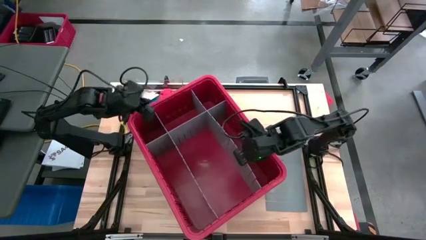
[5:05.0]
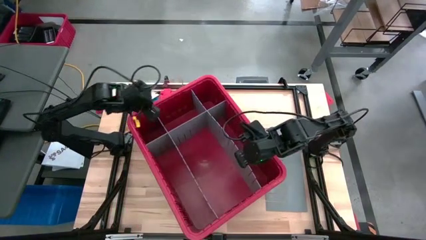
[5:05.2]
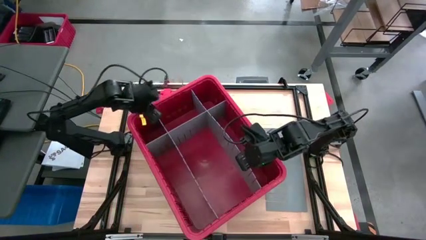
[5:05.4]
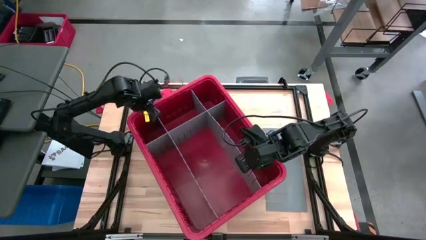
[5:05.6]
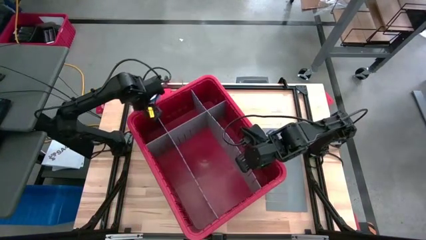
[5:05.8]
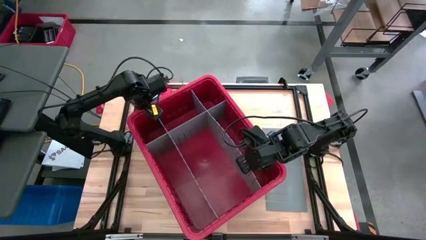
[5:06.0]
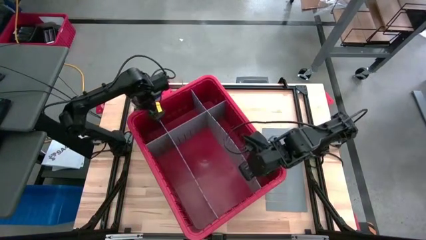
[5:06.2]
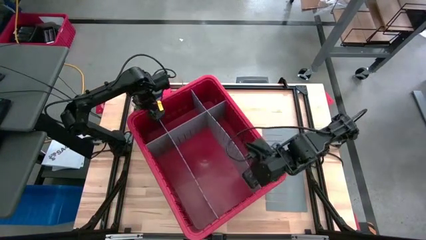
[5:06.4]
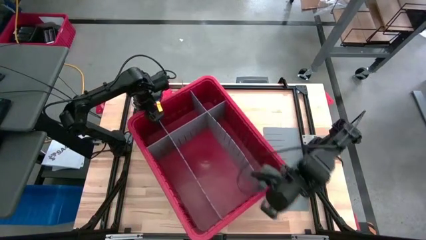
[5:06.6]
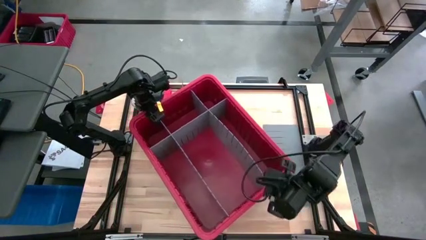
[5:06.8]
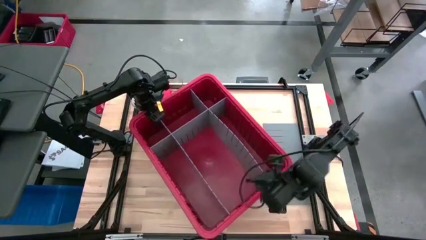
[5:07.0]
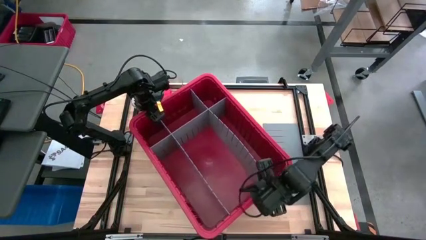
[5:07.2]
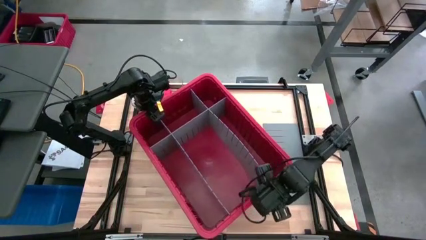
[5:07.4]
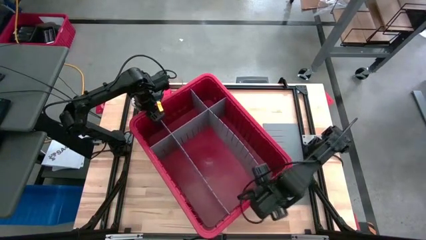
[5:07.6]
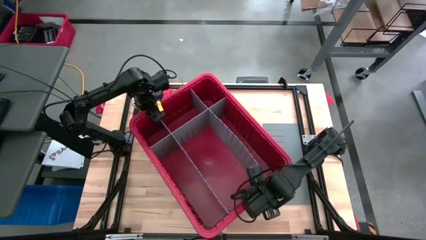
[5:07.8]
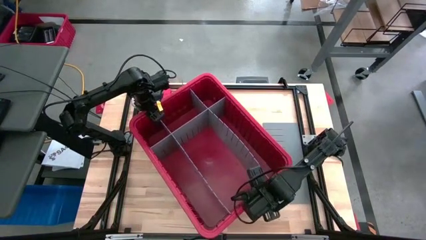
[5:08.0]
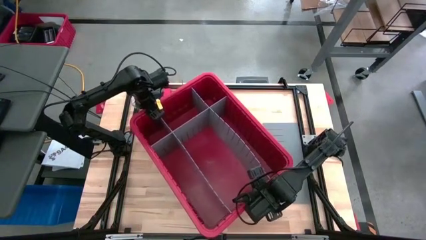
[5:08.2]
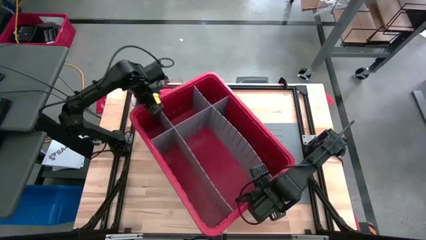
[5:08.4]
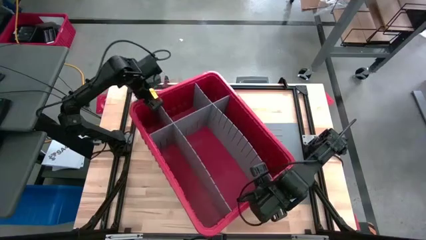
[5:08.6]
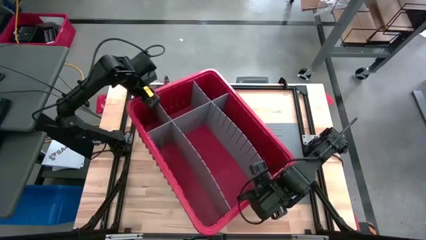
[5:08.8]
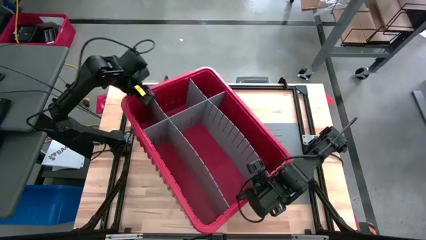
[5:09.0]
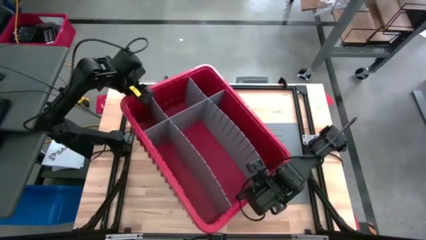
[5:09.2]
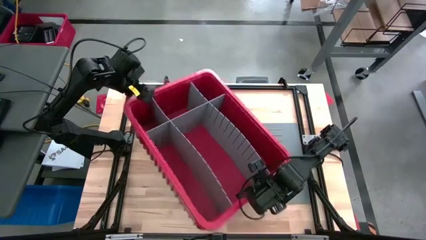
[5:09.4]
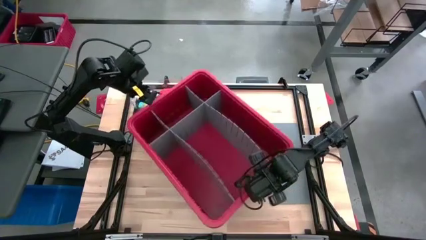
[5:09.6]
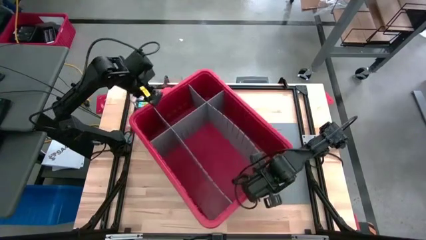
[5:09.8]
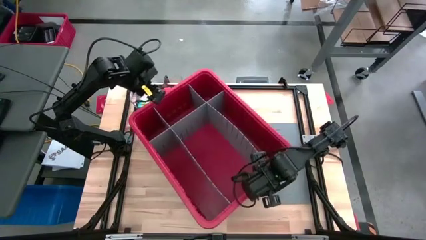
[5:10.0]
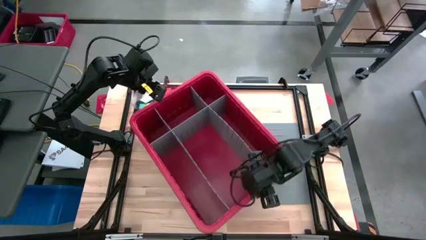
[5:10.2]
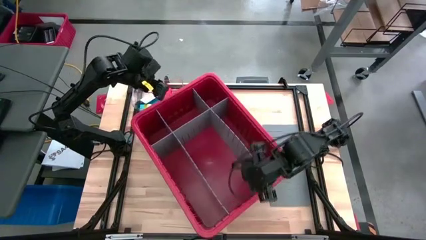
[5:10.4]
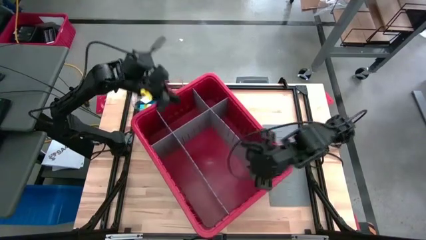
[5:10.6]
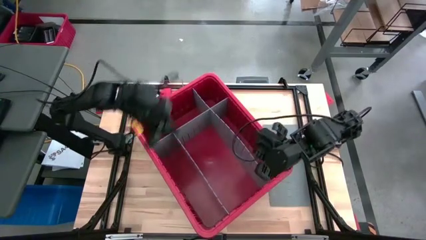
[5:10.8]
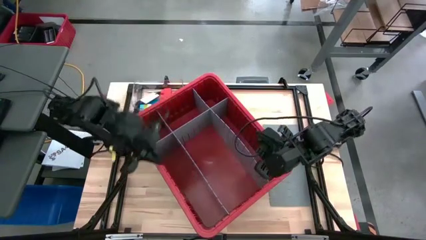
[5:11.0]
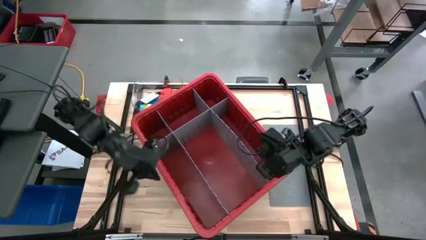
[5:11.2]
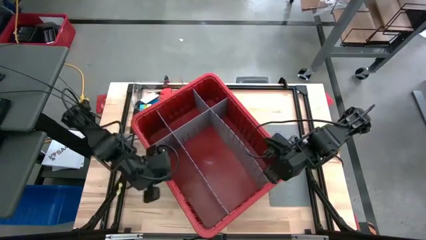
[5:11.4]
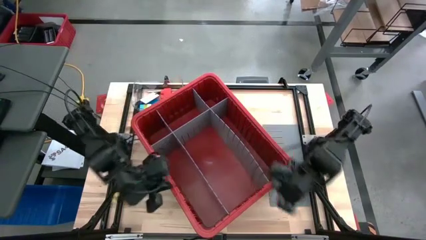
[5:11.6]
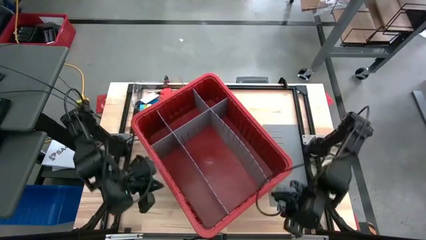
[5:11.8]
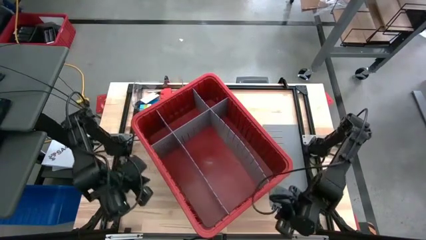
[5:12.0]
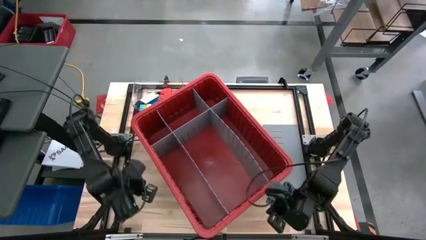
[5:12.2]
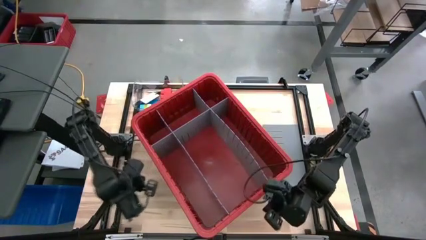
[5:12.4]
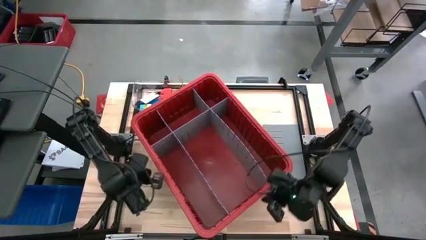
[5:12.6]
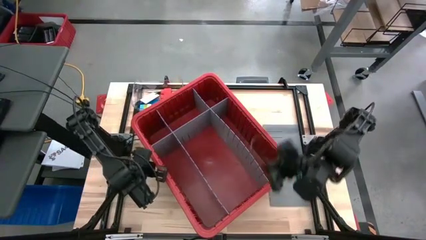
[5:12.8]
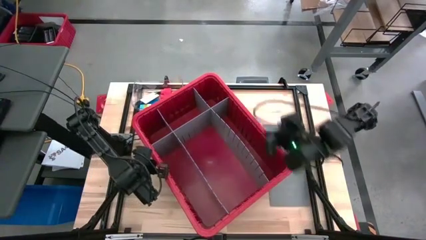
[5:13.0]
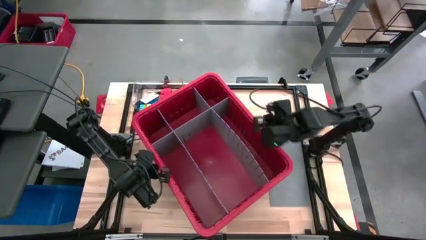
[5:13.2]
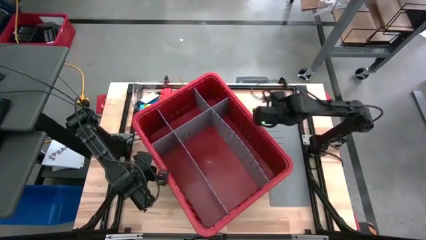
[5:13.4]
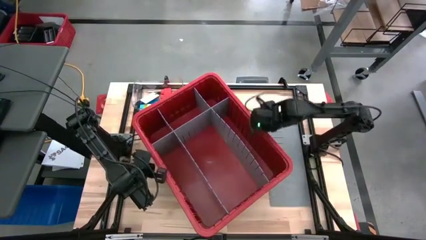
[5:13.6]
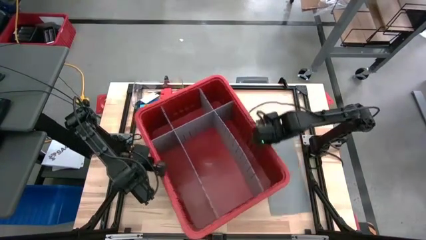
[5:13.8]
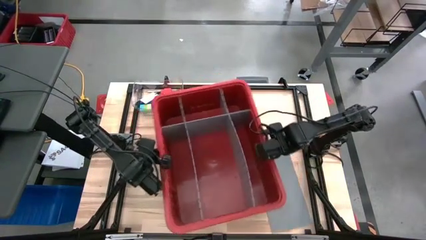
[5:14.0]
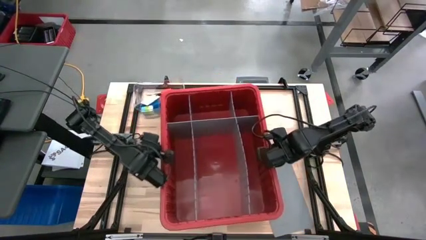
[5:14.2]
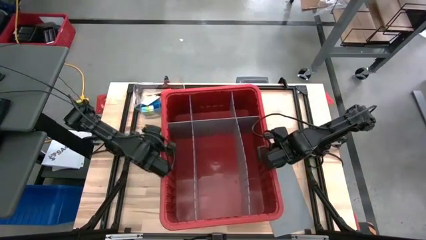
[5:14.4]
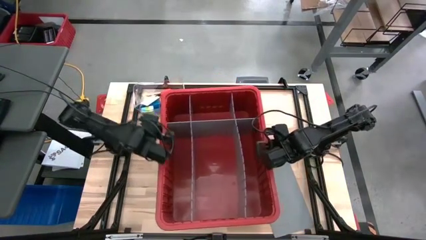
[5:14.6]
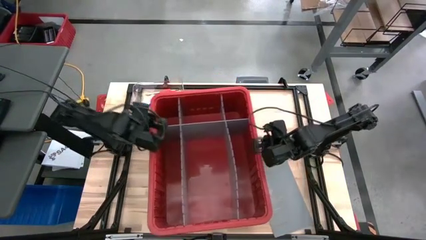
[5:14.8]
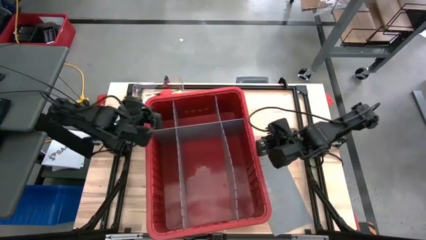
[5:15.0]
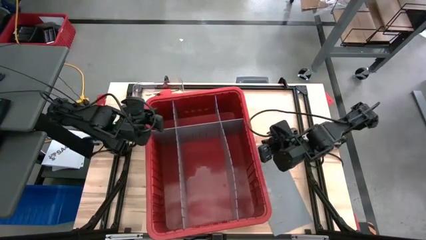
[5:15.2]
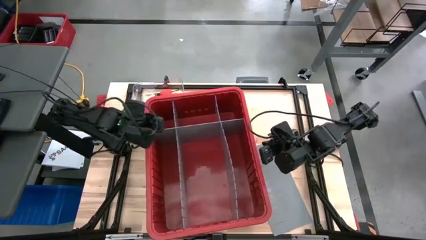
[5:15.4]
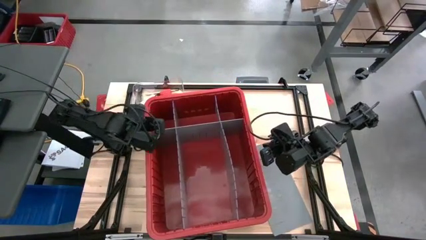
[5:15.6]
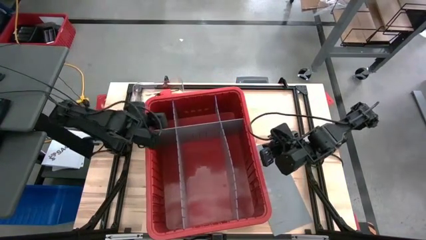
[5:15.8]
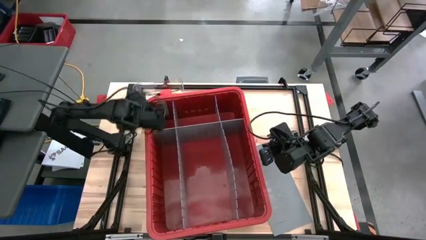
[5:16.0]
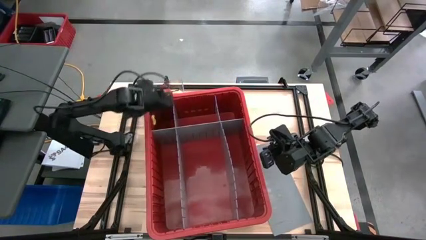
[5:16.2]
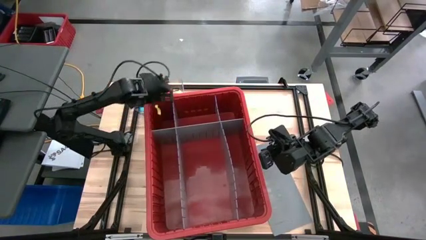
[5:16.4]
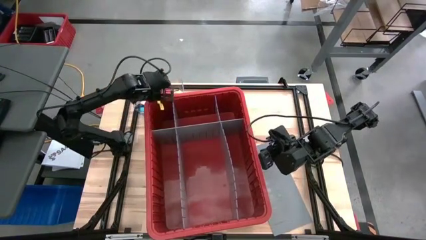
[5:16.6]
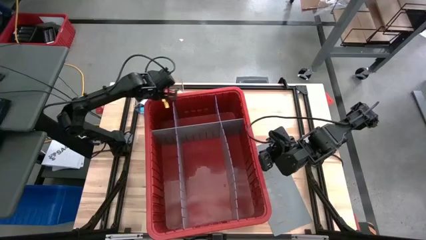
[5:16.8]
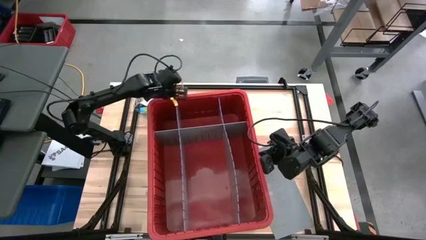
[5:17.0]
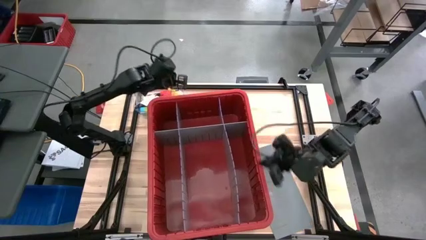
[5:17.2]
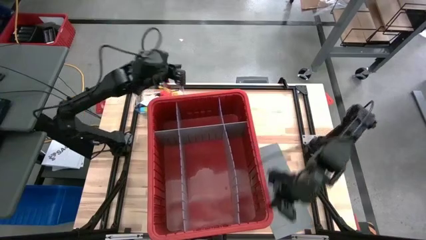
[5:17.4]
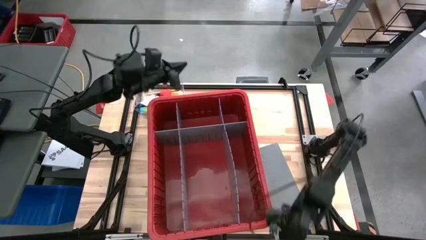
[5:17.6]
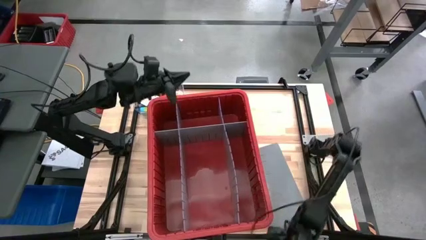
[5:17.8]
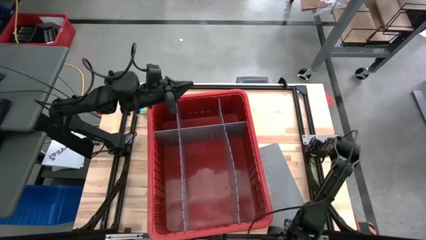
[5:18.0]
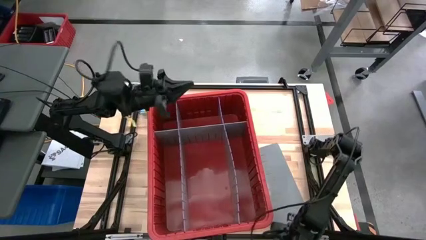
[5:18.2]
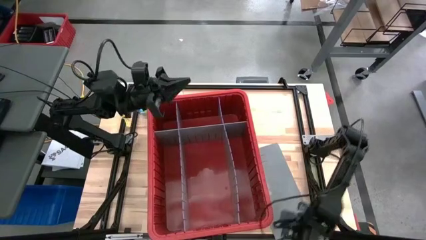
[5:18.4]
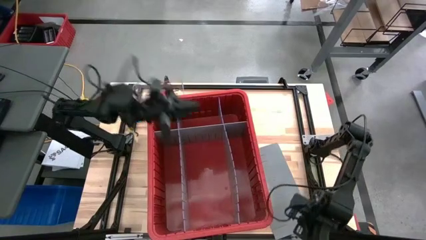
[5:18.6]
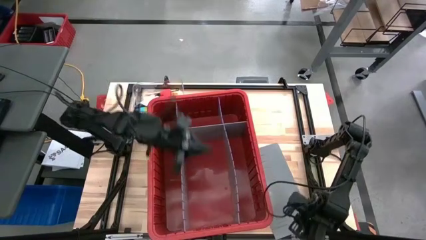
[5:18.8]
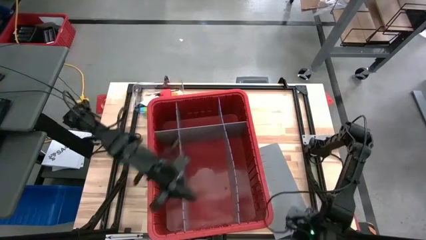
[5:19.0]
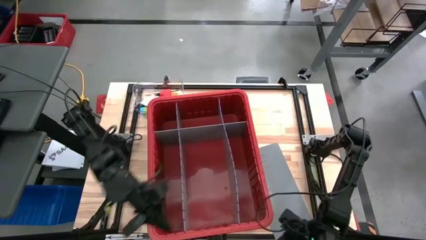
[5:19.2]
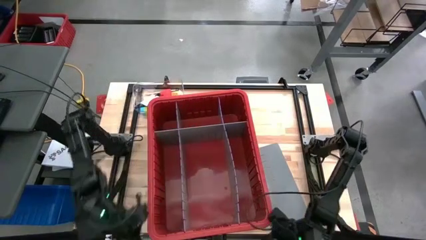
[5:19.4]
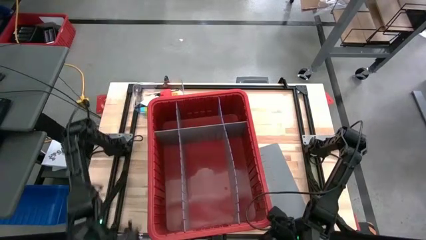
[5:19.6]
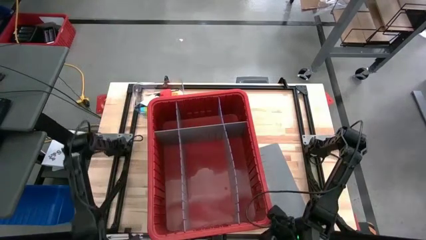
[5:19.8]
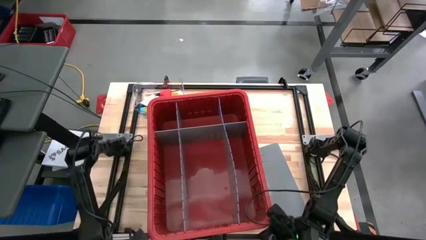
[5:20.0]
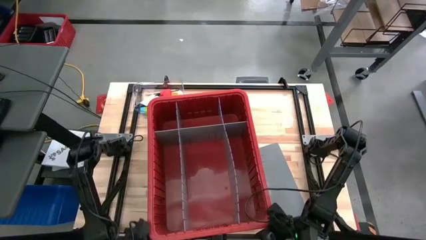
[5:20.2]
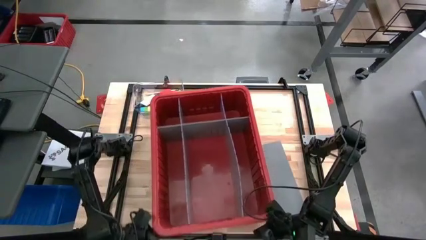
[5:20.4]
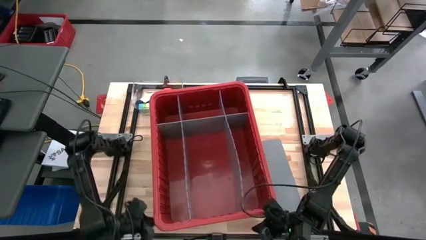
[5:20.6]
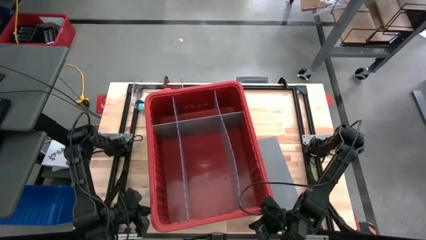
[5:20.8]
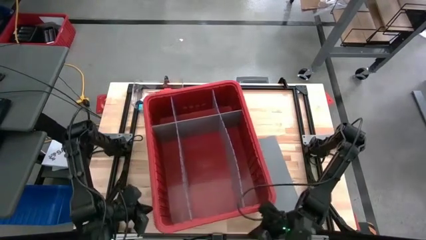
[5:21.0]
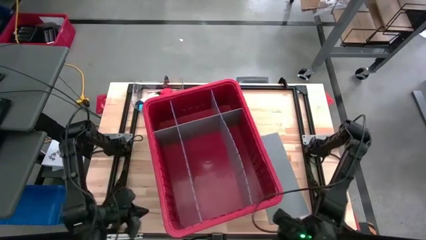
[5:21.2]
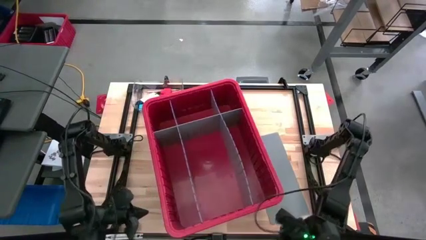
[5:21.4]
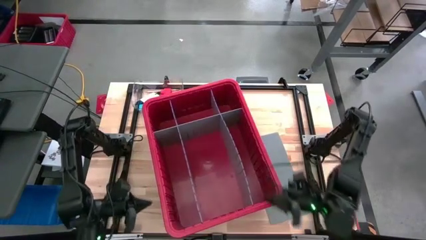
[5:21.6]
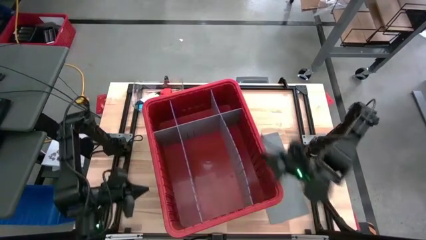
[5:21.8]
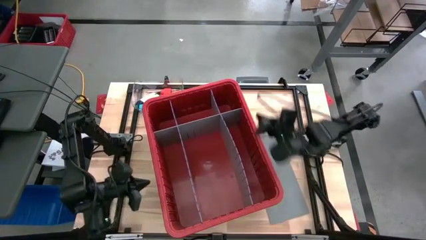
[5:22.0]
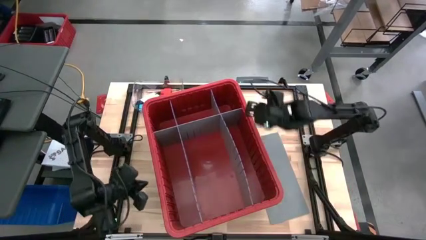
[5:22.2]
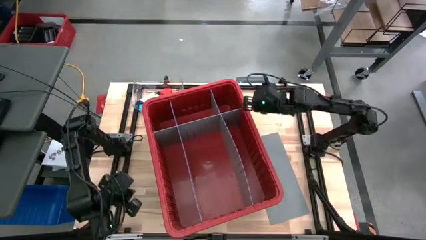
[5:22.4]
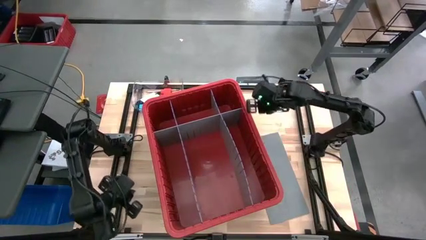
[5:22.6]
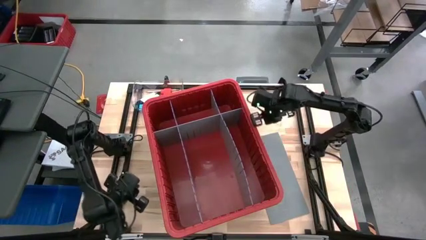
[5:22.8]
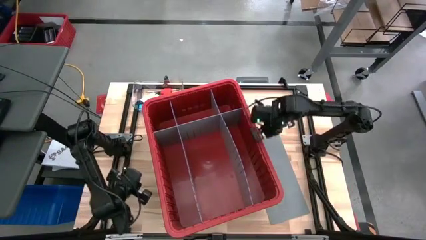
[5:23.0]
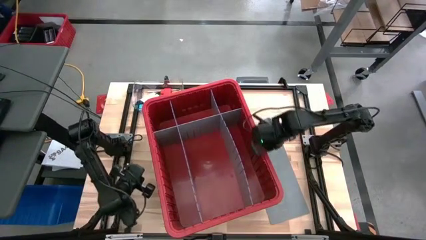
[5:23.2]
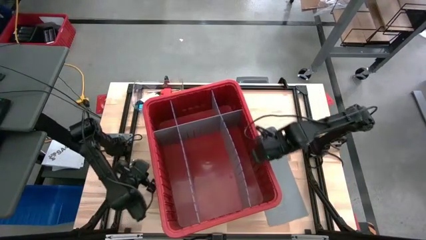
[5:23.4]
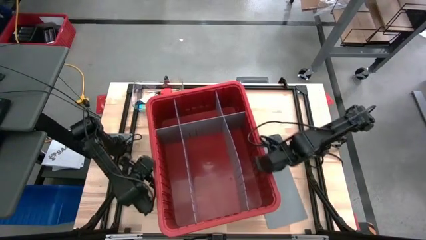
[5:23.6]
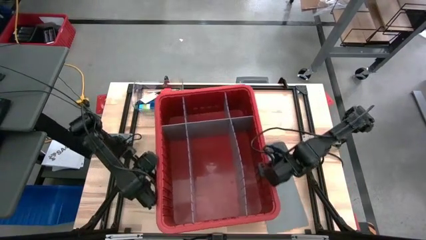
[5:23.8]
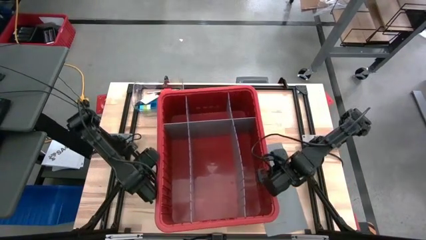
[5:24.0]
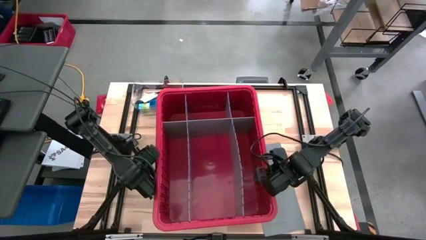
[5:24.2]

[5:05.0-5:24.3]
Task: Sort blocks
Assemble the bin divider into the red bin
